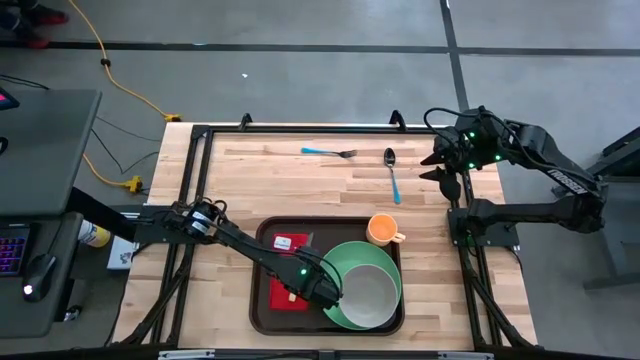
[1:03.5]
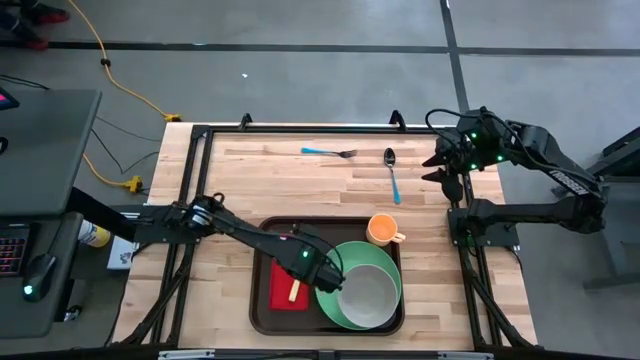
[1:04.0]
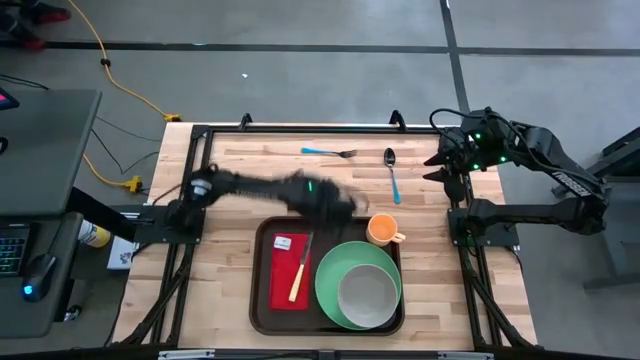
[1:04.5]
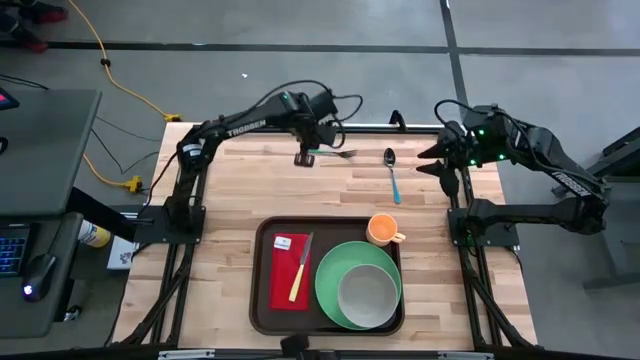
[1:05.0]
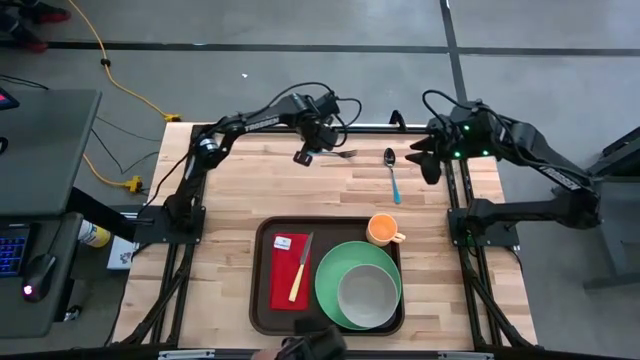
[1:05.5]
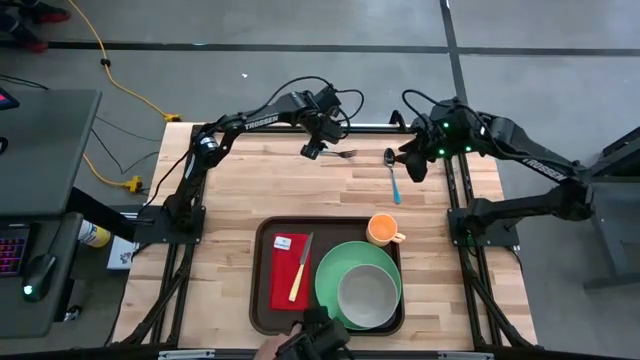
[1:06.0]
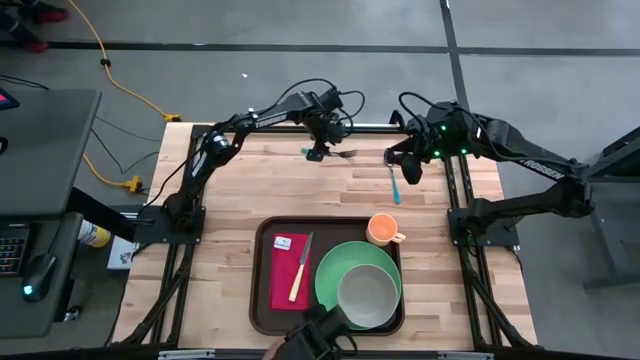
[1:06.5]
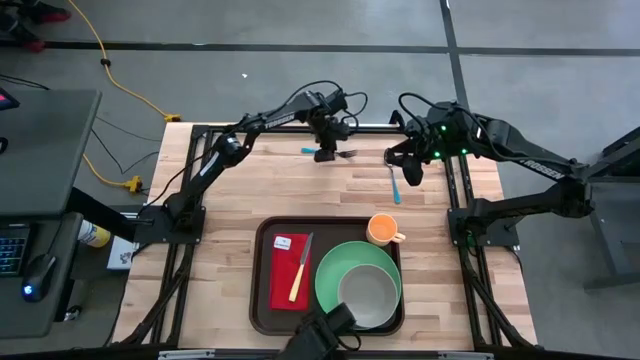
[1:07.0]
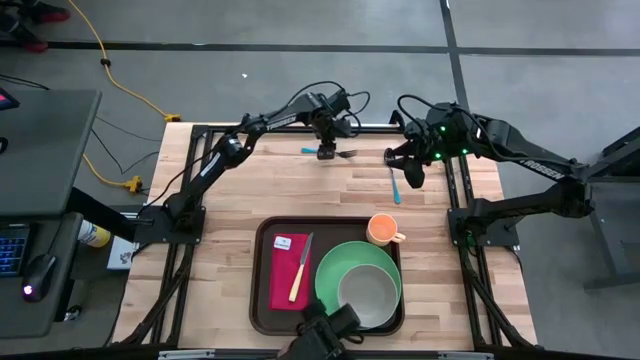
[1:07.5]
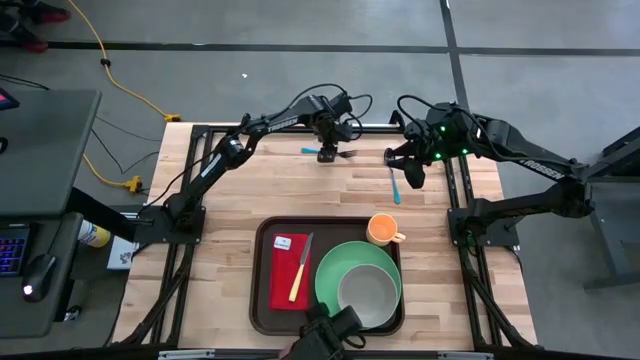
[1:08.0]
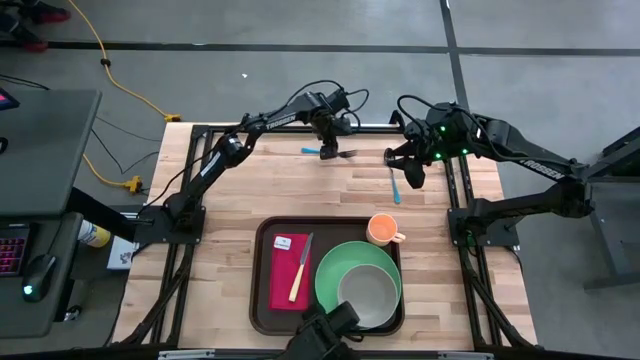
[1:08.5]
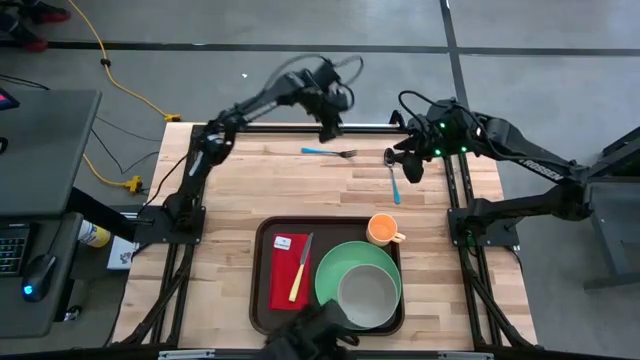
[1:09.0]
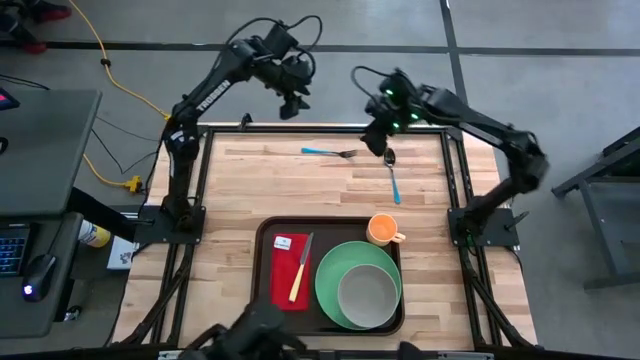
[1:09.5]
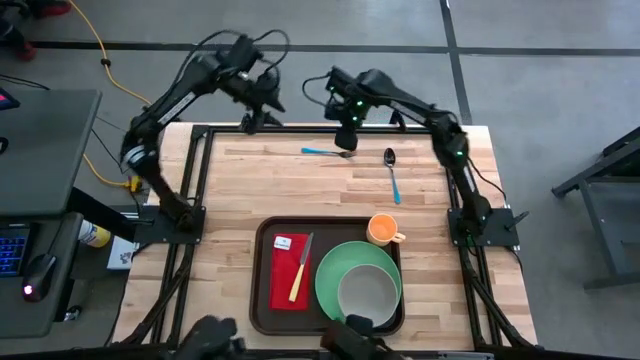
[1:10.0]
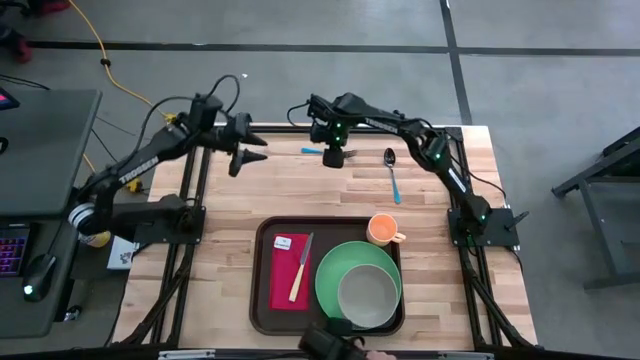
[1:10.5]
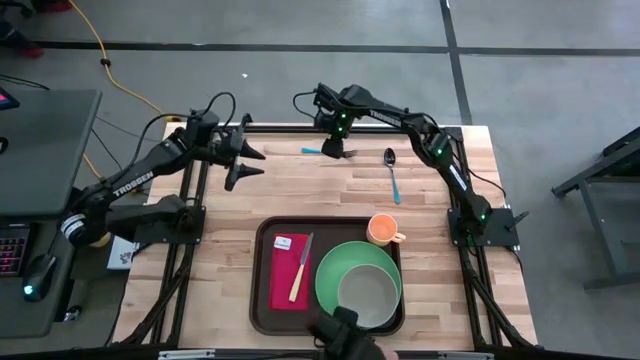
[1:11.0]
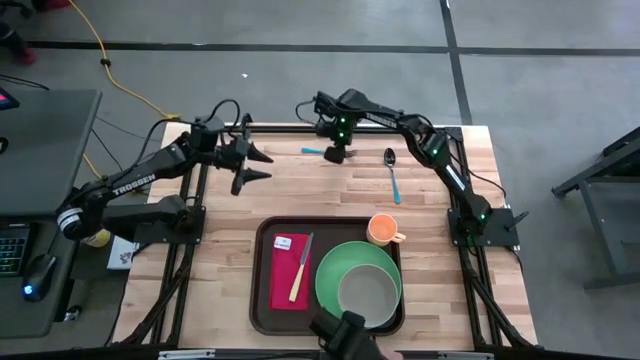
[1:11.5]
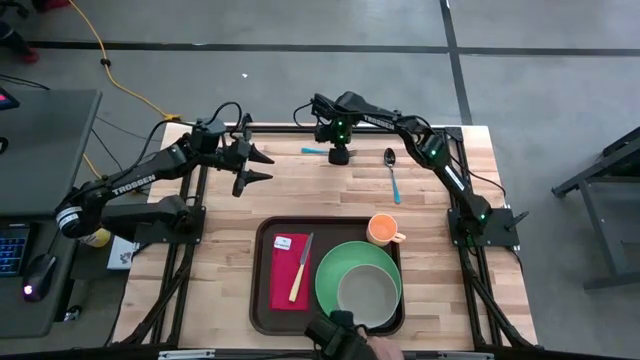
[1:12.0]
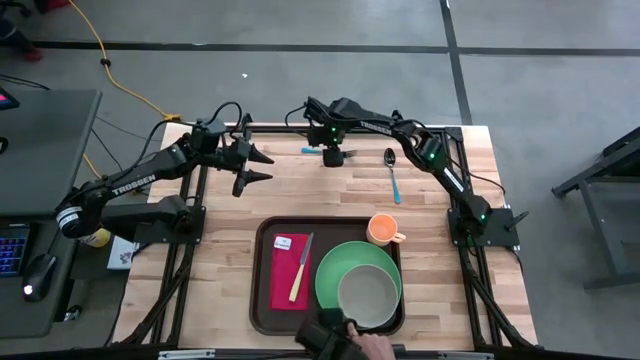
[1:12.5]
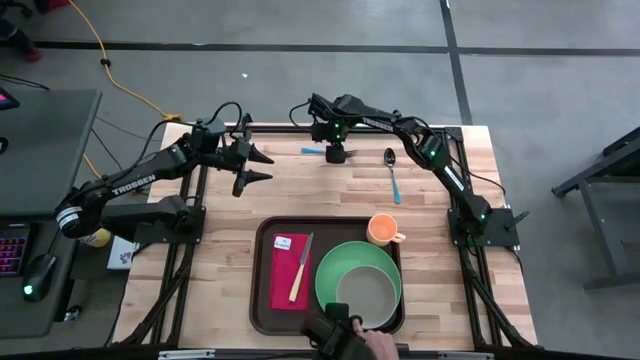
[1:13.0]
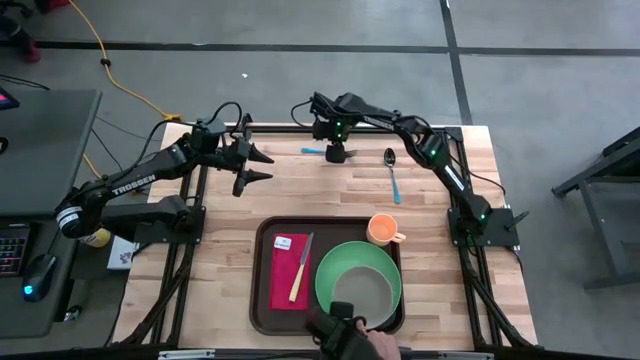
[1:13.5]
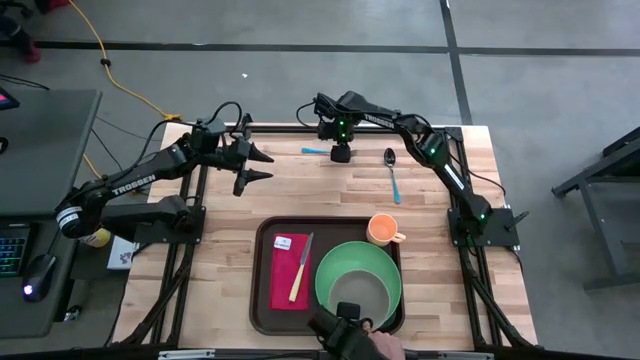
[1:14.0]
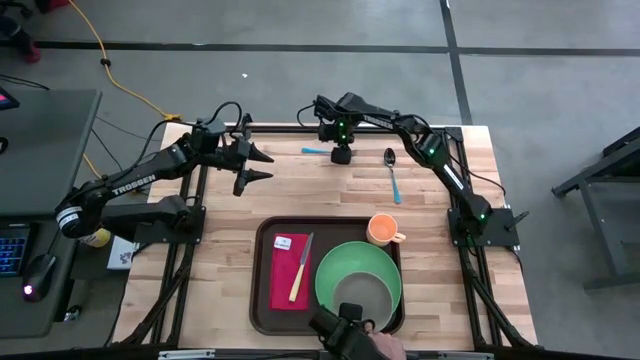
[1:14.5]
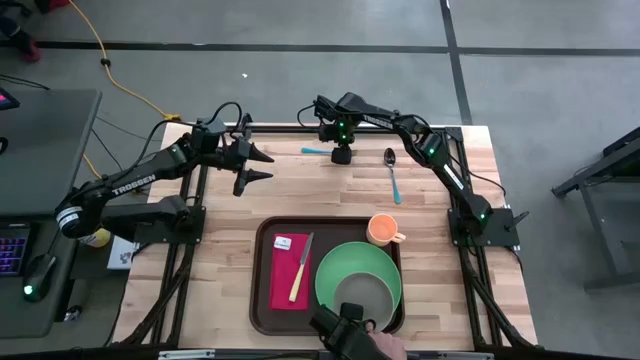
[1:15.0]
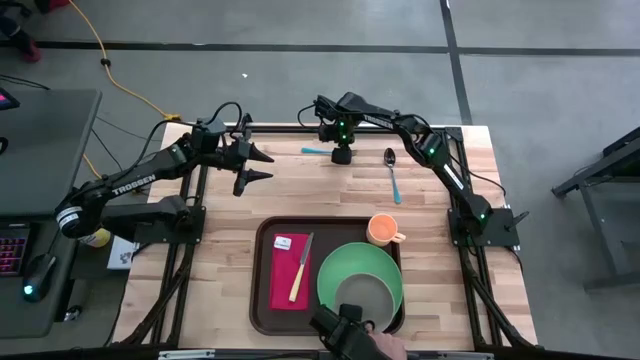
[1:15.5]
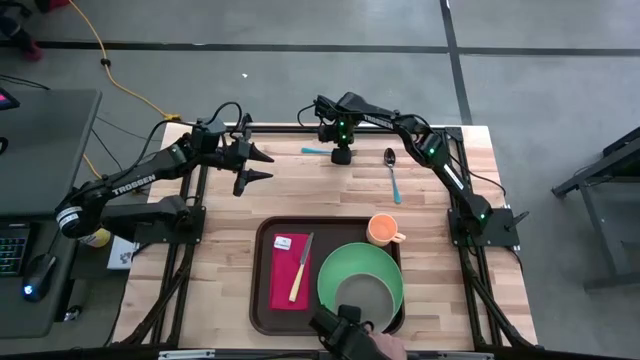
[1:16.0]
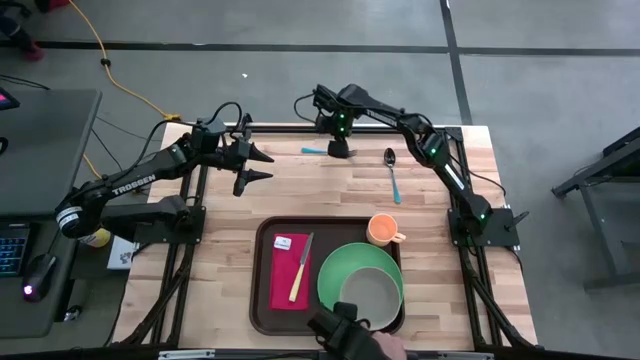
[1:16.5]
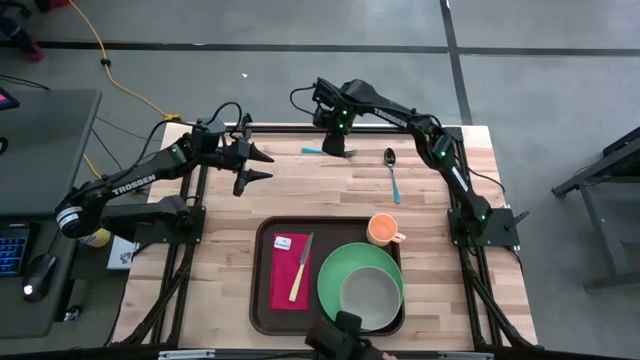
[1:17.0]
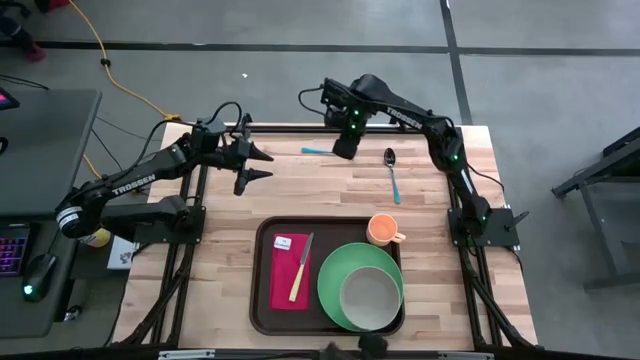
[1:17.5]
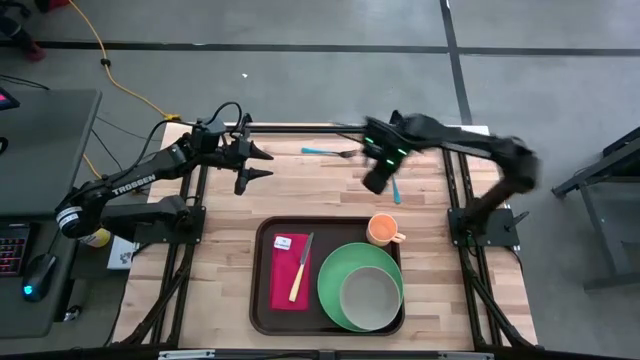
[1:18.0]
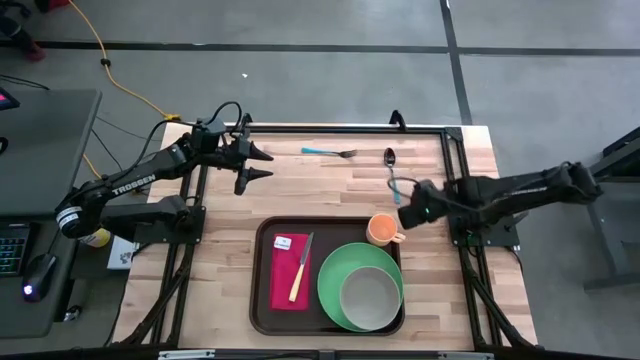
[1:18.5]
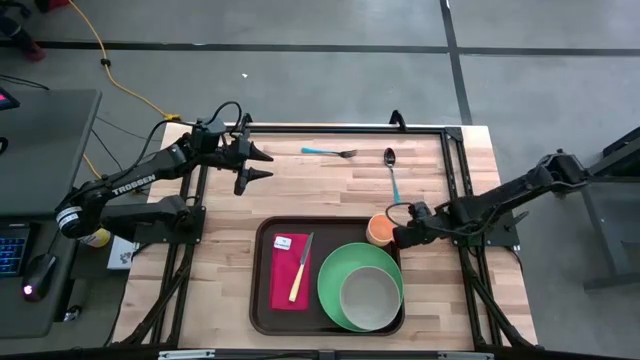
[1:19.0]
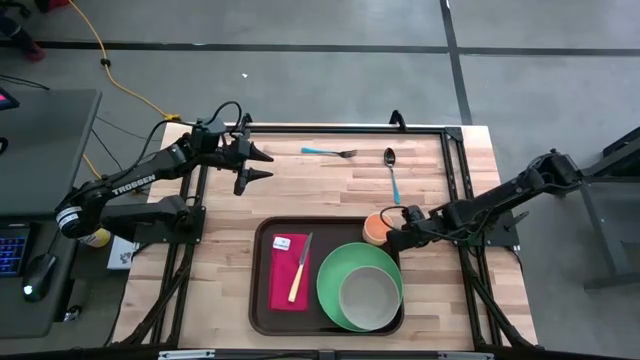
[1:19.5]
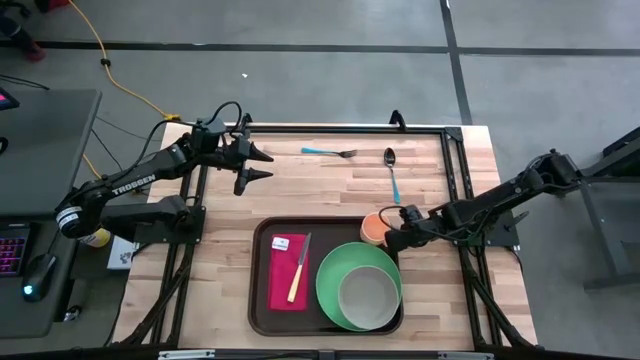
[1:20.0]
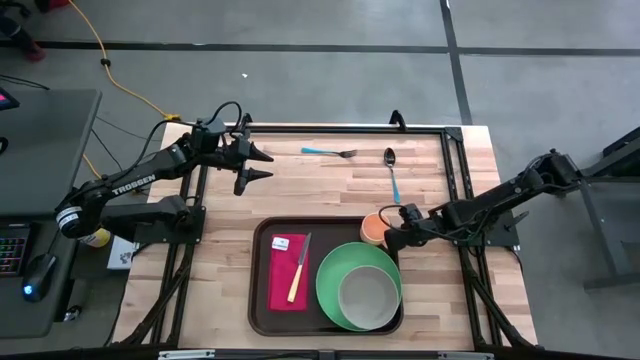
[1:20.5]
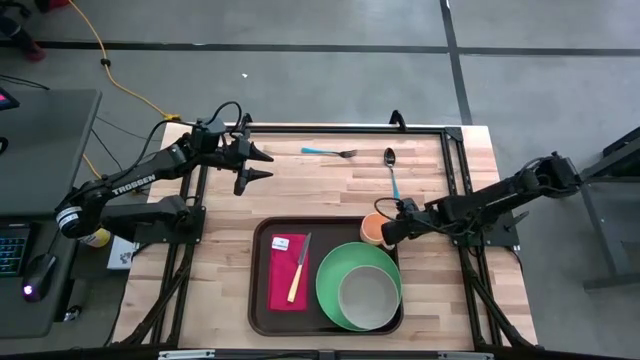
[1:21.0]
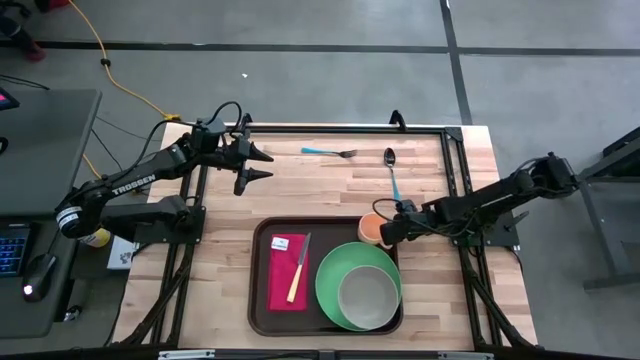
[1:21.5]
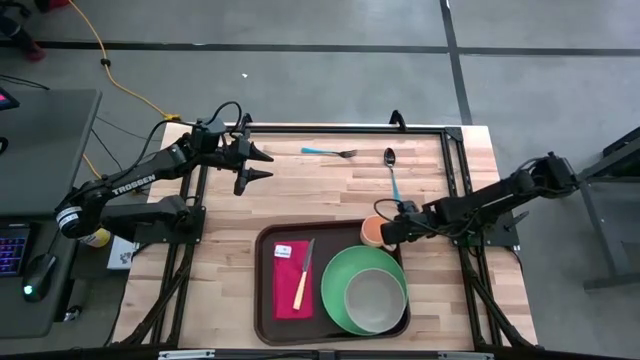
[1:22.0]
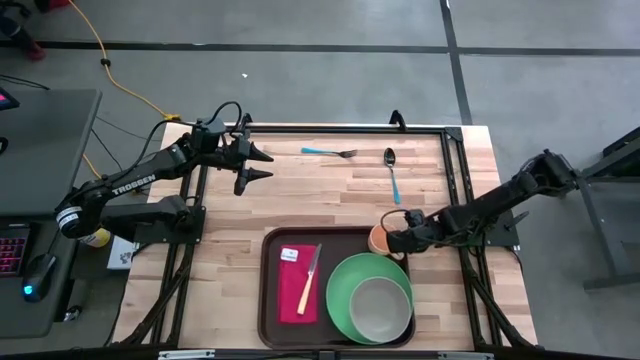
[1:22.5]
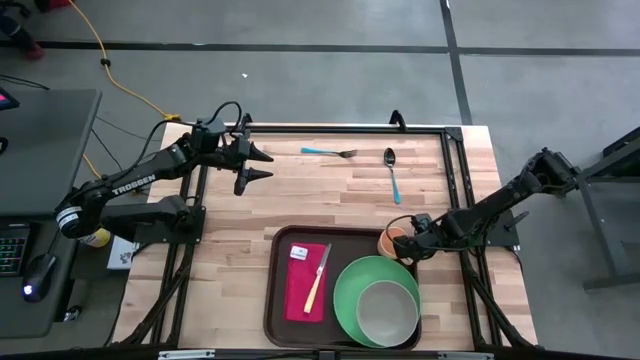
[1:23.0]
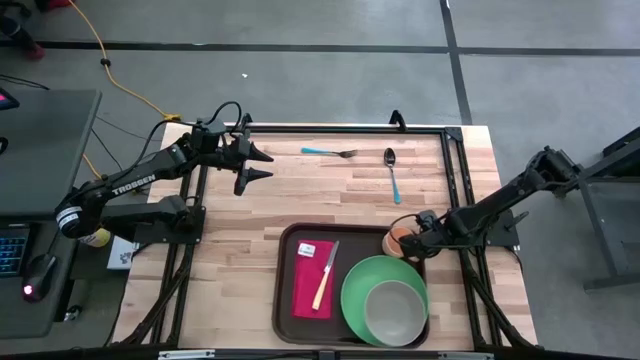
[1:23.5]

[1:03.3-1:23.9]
Task: Set up tray
Adjust the brown tray

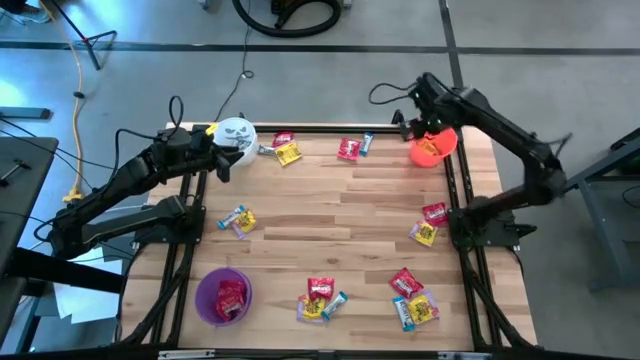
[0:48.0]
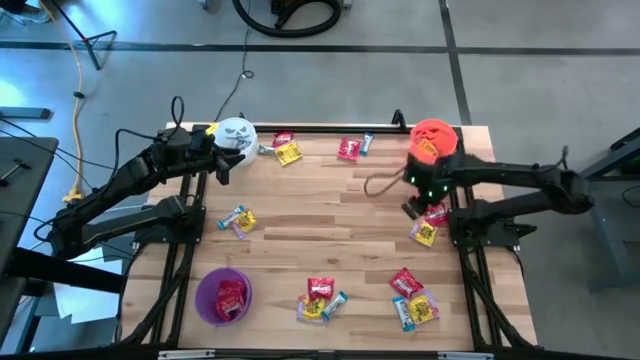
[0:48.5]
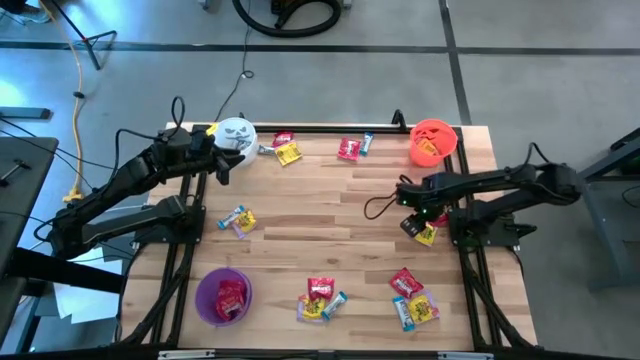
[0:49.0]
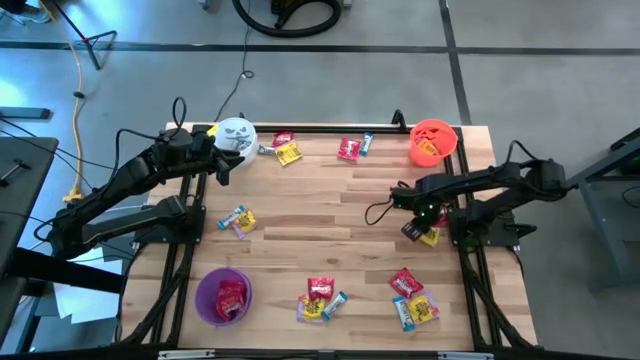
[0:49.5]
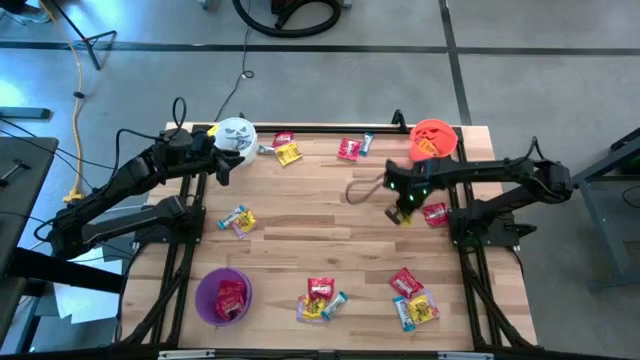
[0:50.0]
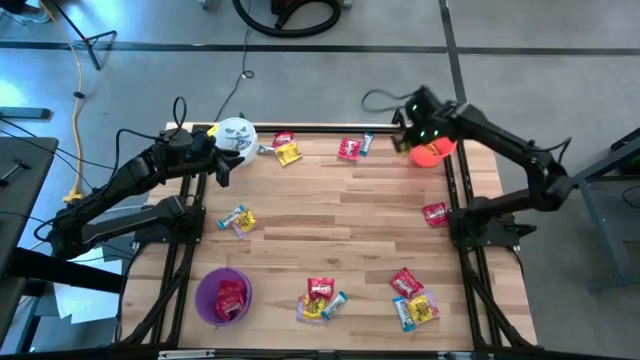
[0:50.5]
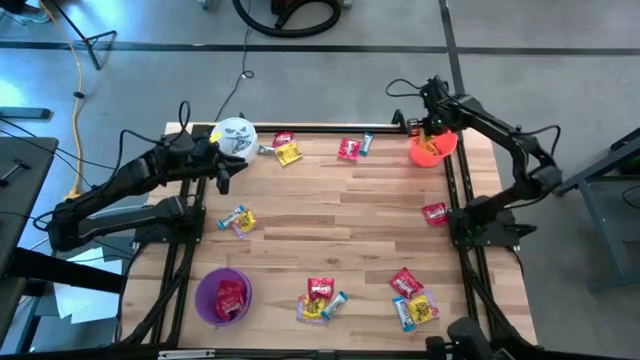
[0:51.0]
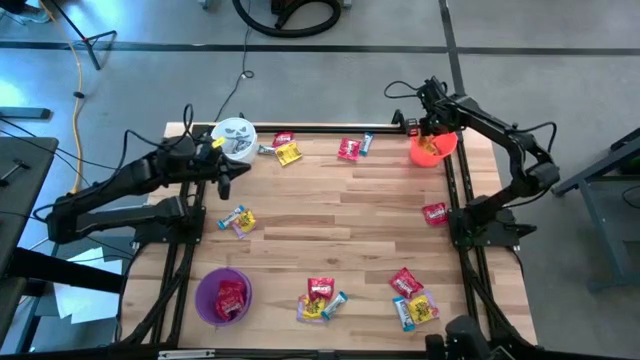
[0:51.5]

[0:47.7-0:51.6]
Task: Sort candy
Put the yellow candy into the orange bucket
